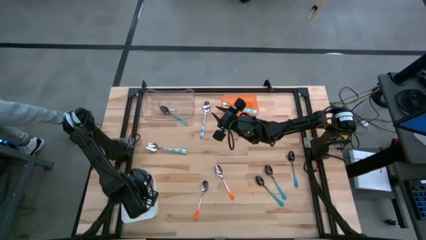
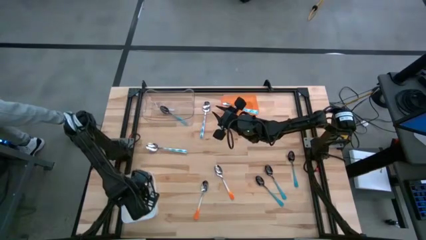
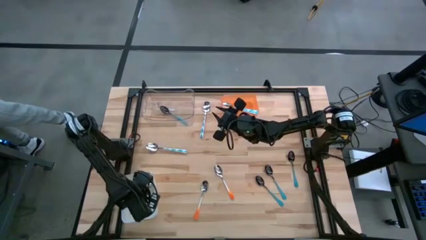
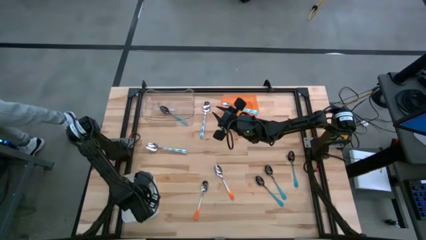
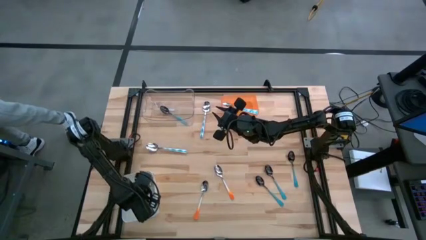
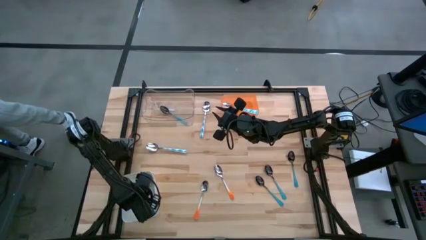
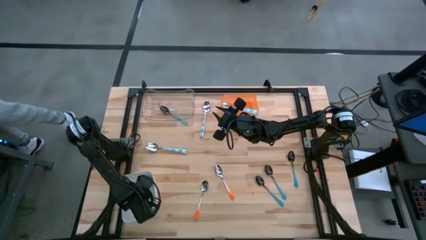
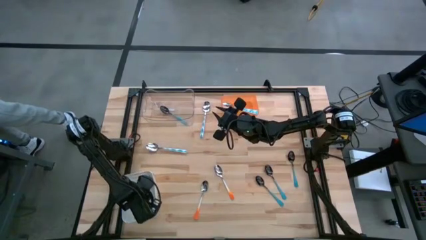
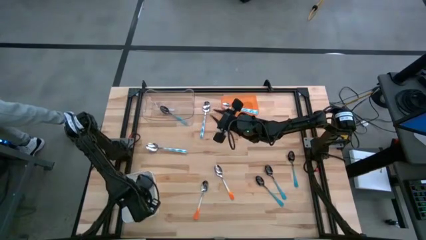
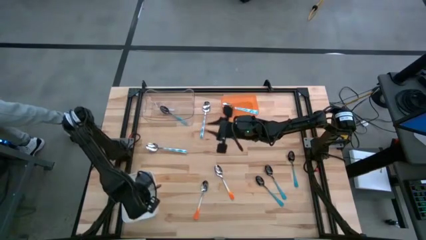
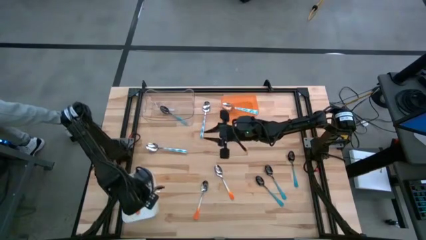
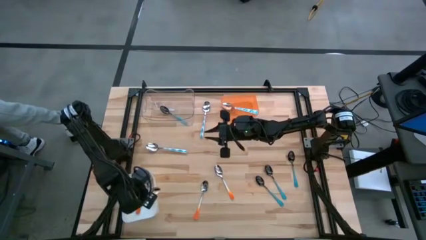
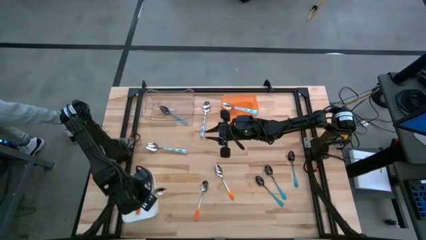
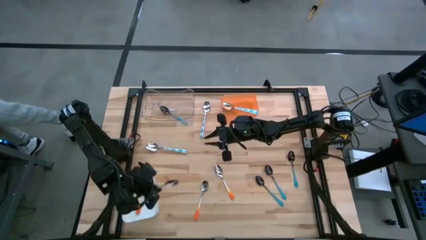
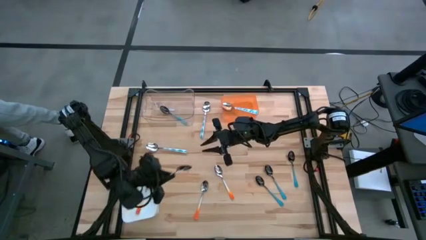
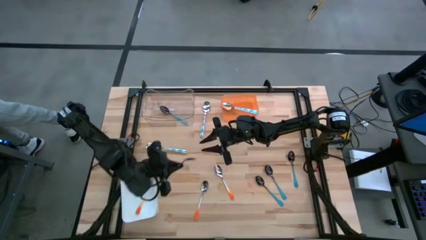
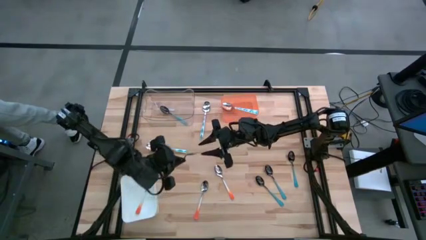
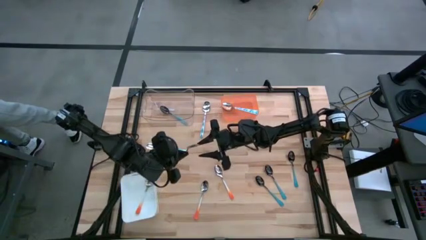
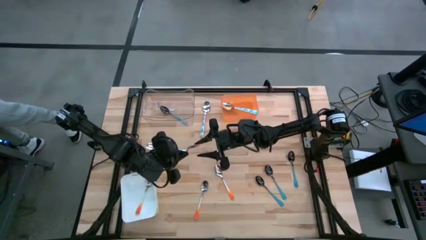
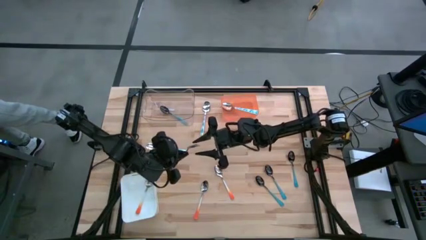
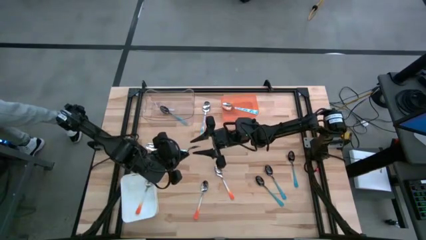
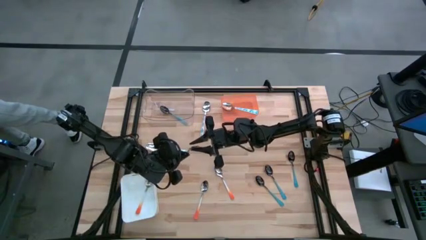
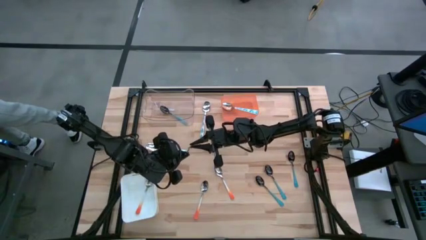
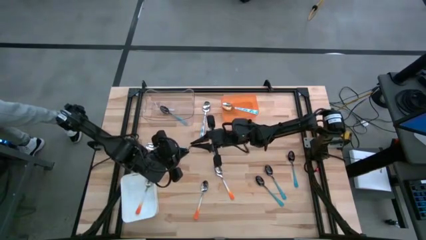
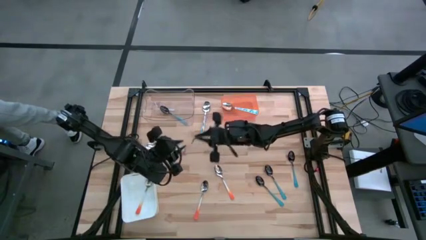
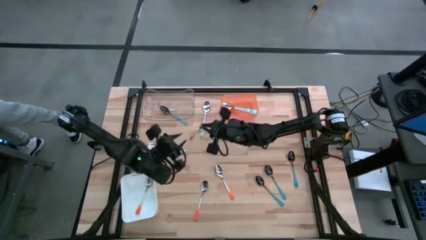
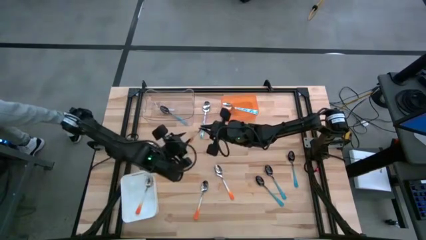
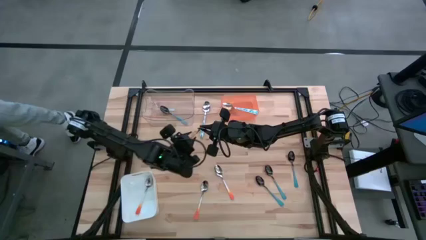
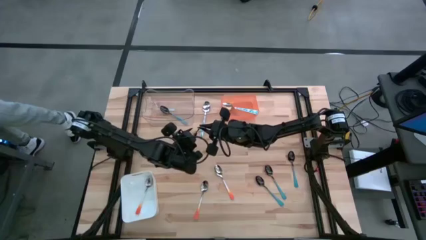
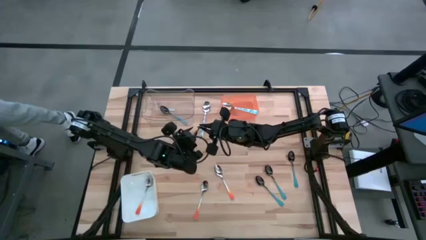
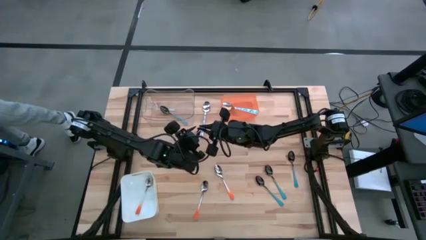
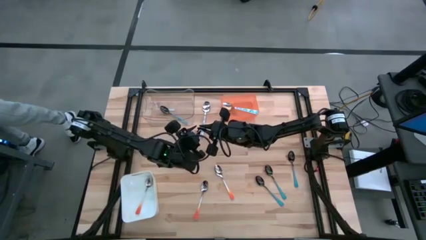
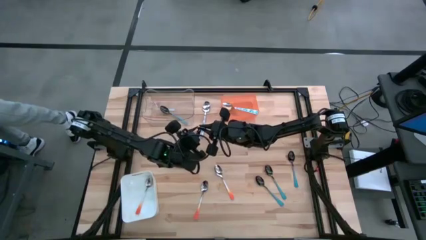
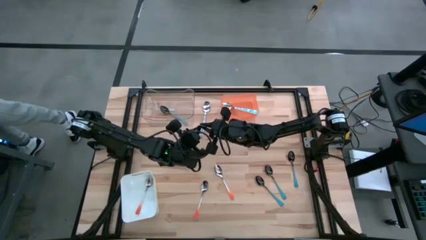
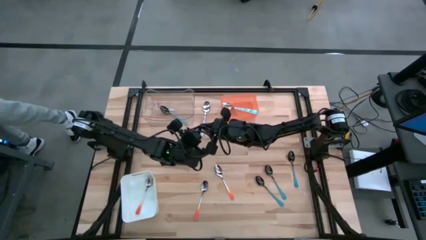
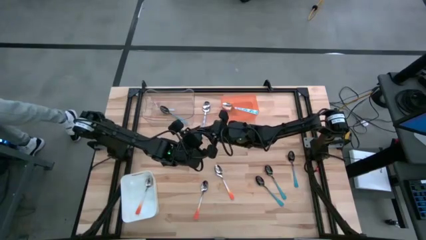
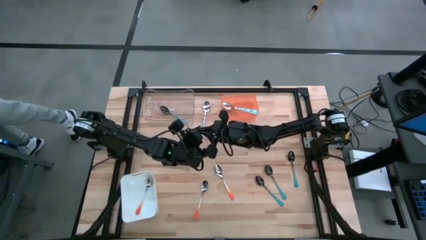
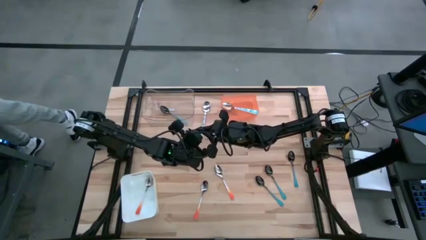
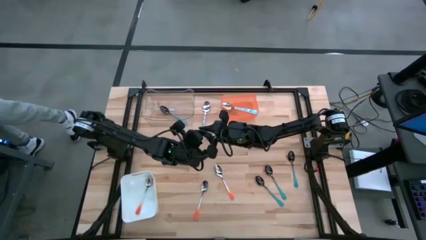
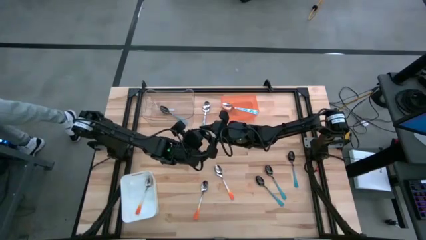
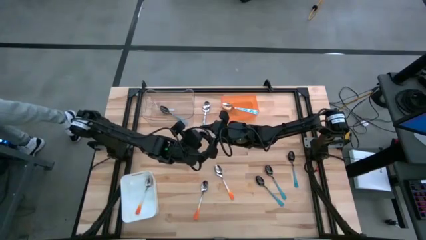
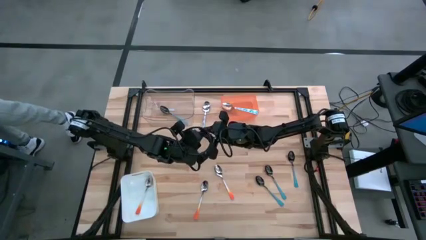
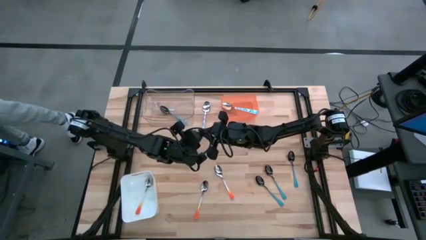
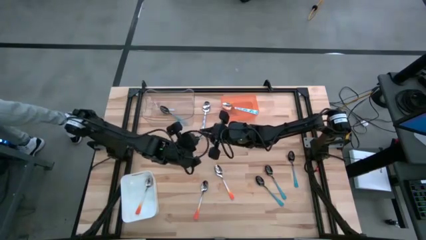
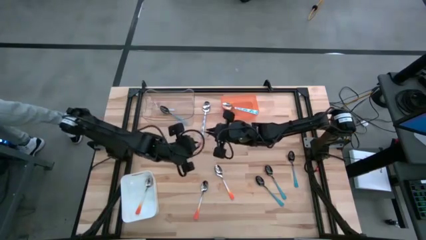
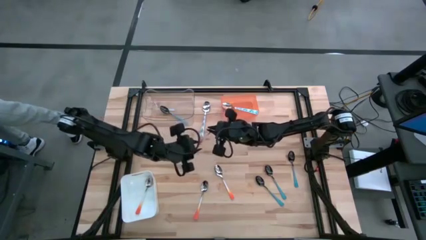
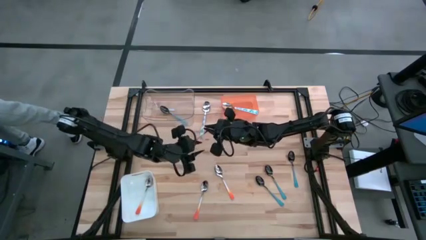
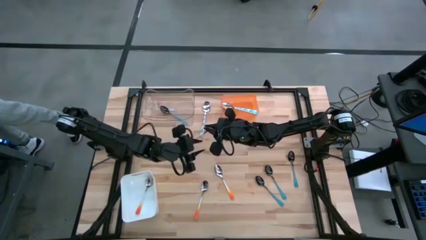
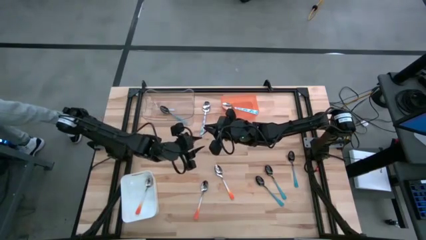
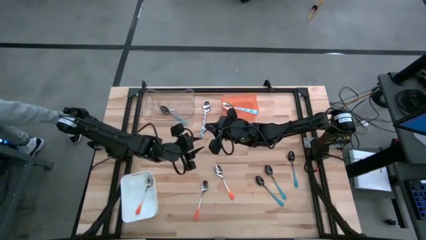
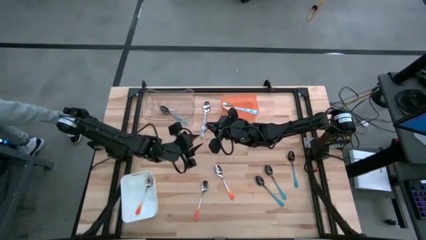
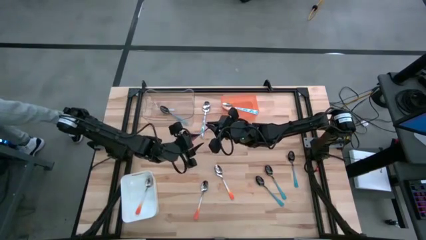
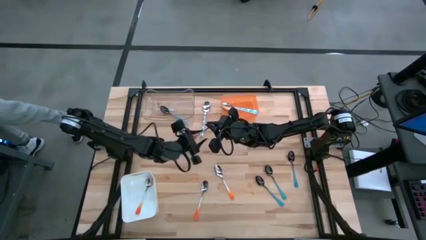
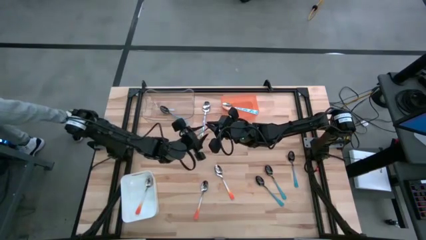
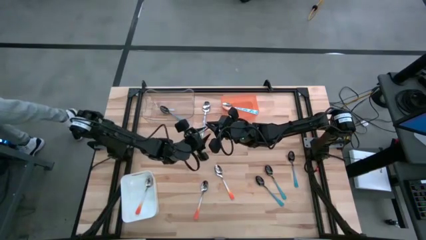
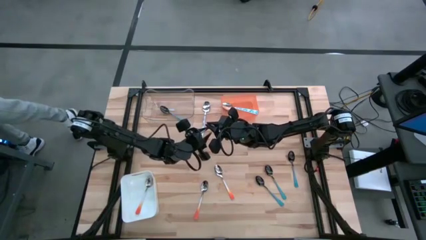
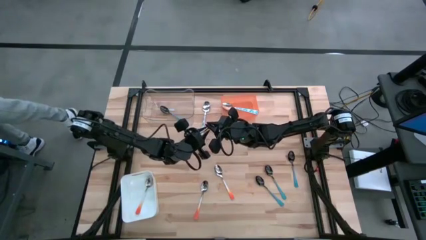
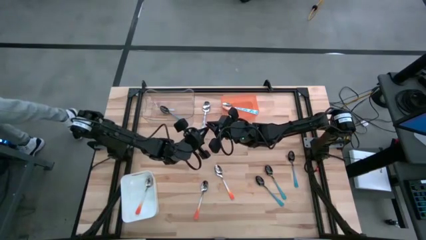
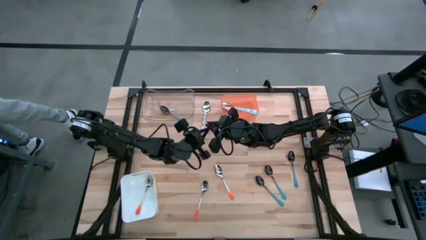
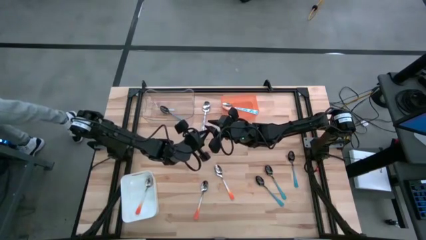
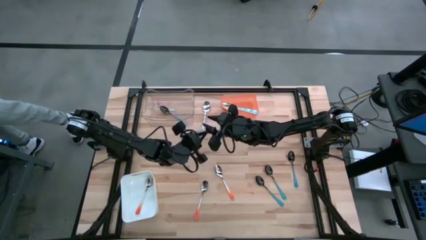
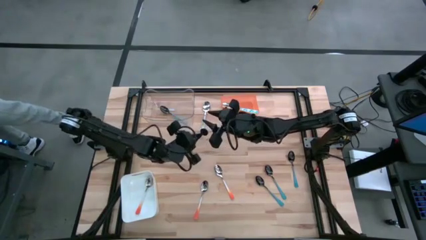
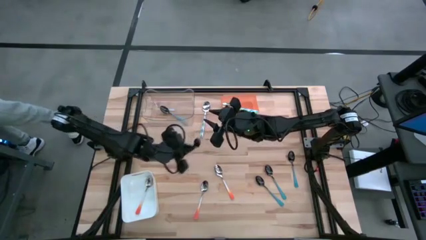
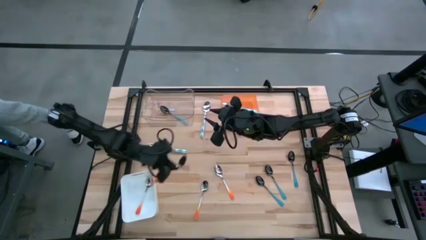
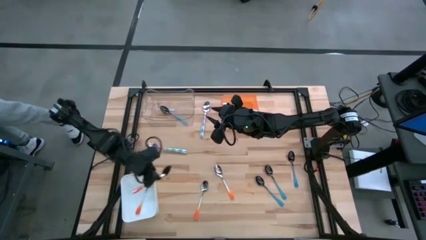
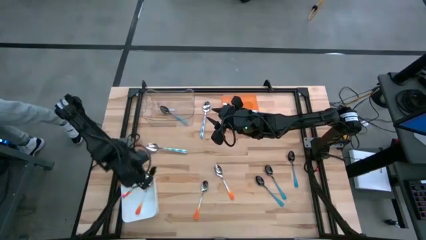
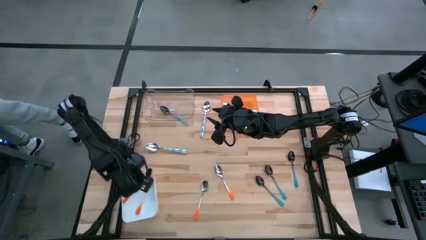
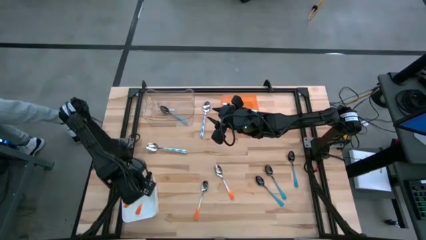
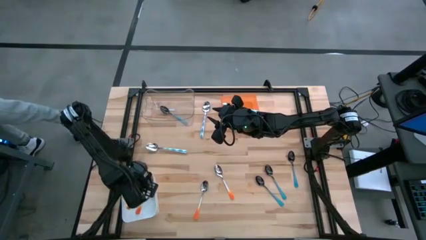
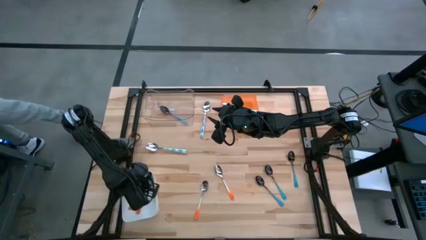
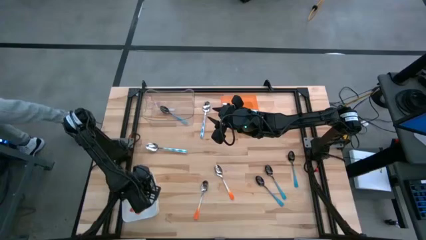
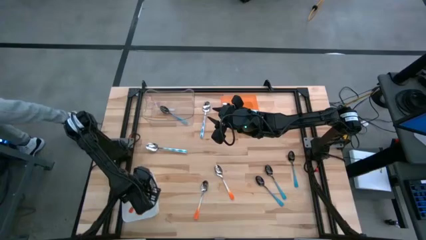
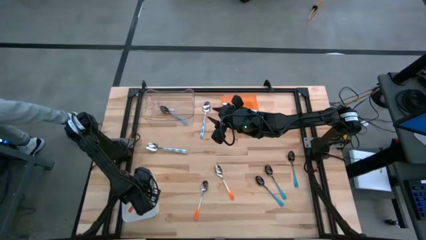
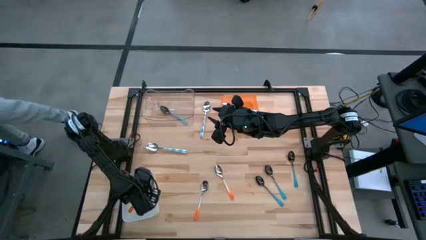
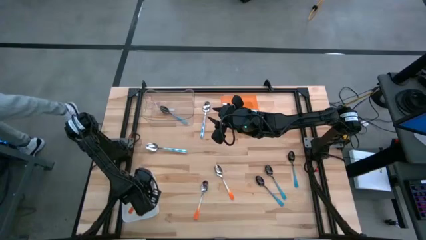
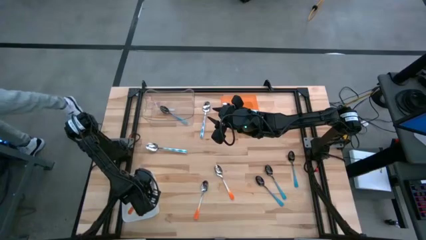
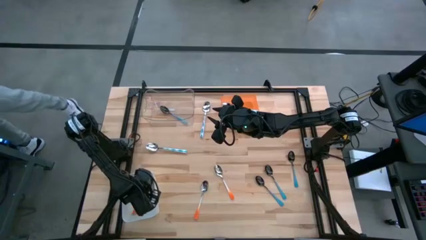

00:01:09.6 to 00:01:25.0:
Task: Sort silverware by color (type)
Put the orange spoon into the white bin
